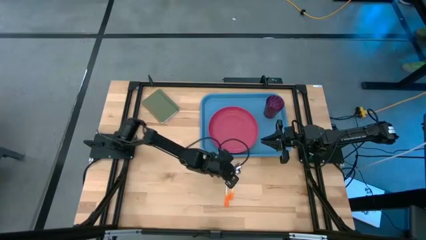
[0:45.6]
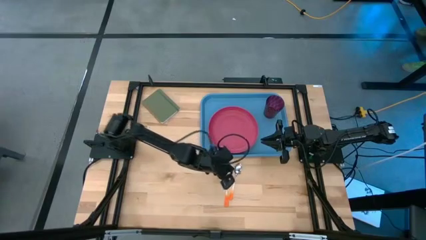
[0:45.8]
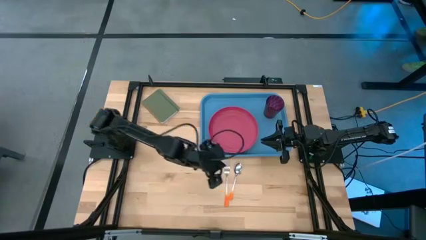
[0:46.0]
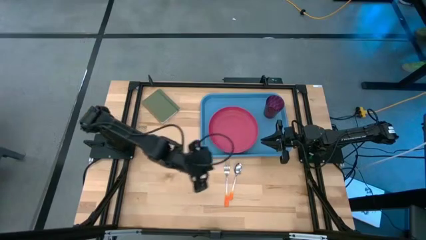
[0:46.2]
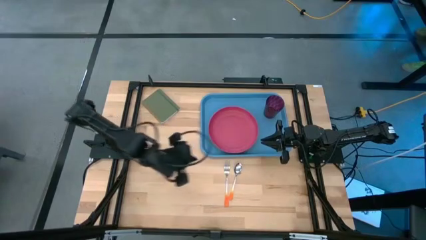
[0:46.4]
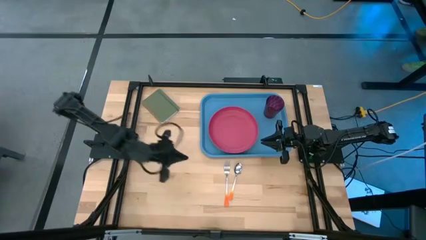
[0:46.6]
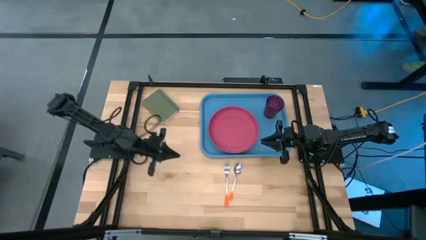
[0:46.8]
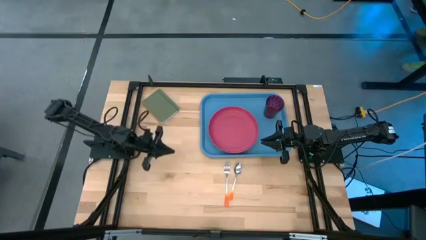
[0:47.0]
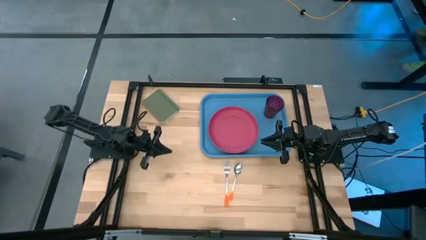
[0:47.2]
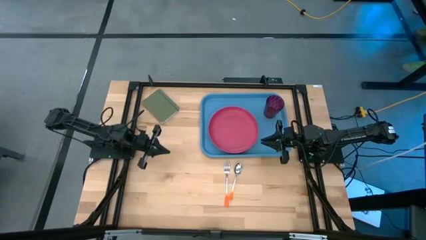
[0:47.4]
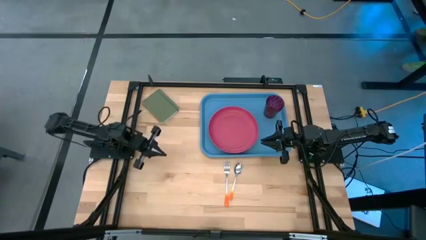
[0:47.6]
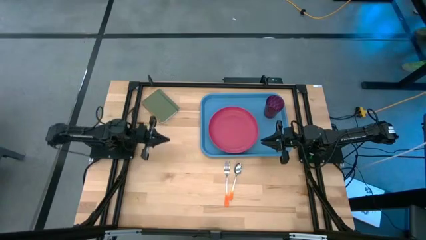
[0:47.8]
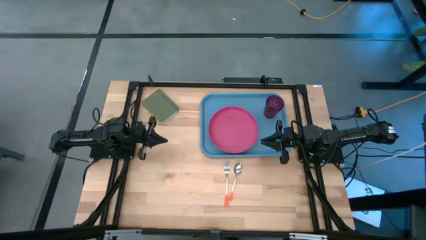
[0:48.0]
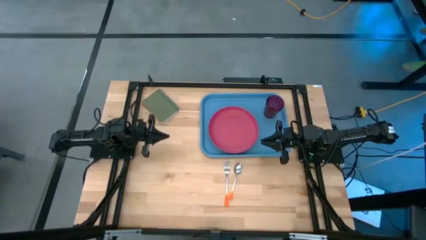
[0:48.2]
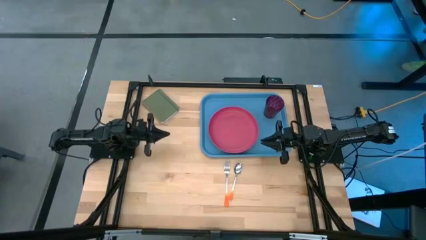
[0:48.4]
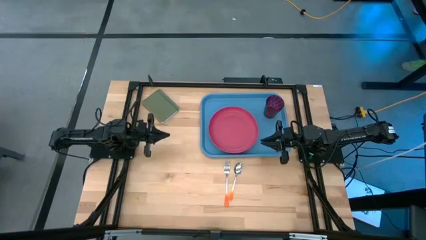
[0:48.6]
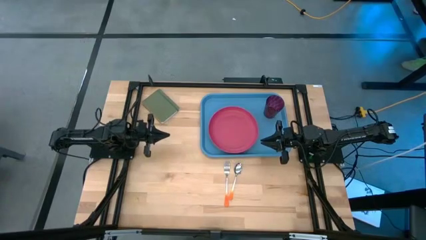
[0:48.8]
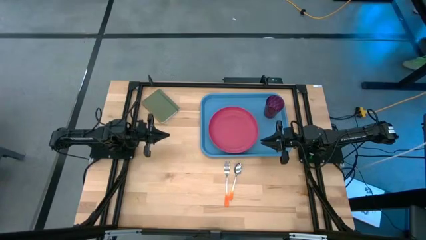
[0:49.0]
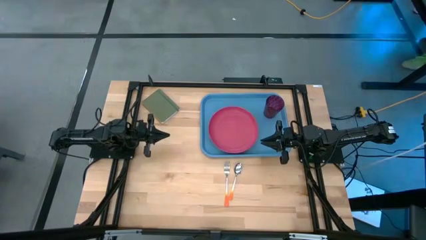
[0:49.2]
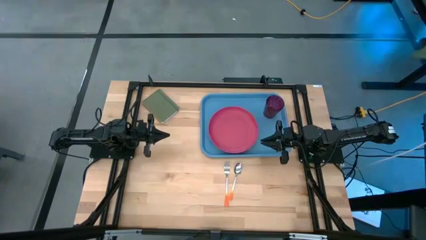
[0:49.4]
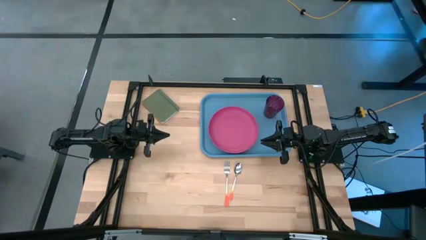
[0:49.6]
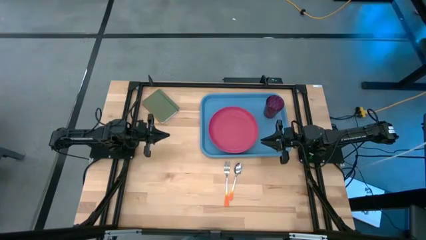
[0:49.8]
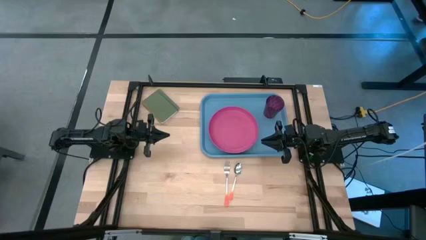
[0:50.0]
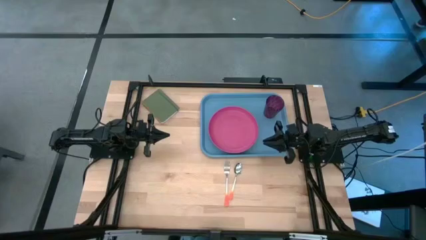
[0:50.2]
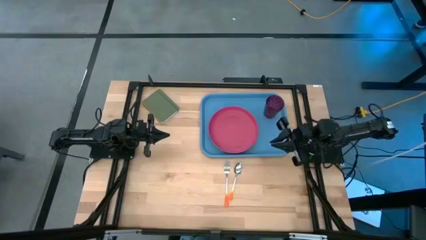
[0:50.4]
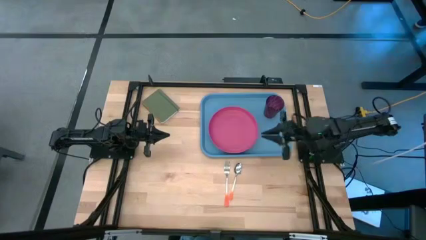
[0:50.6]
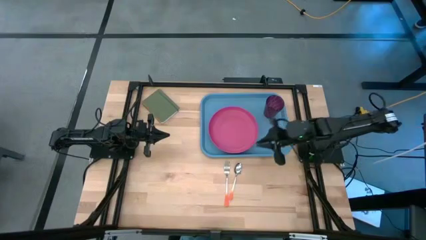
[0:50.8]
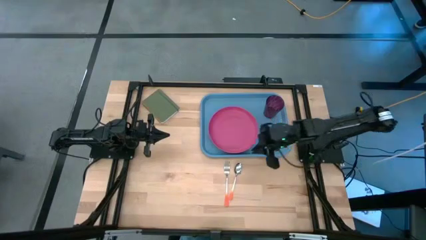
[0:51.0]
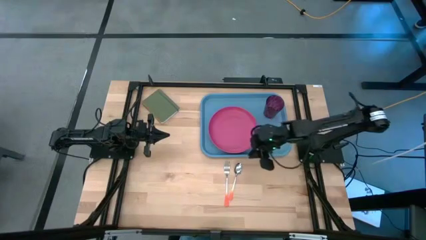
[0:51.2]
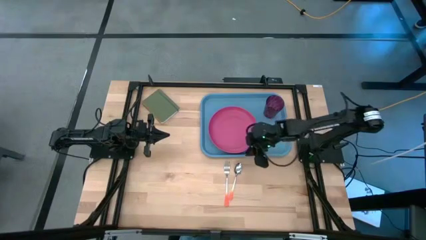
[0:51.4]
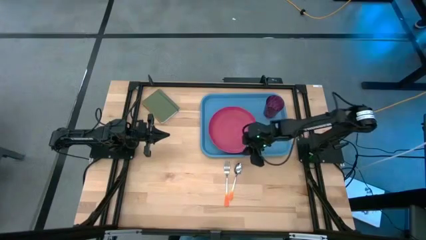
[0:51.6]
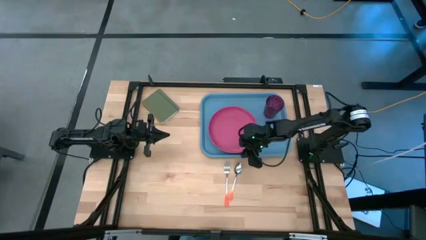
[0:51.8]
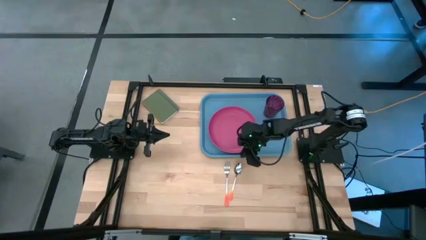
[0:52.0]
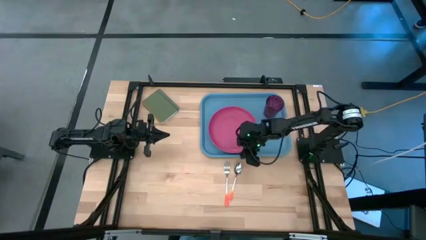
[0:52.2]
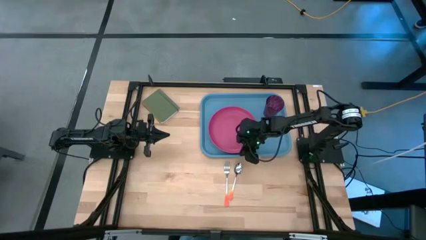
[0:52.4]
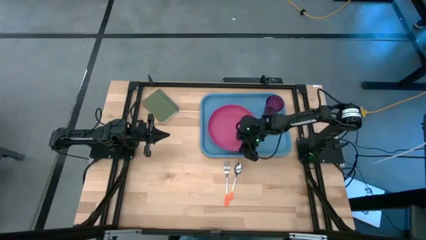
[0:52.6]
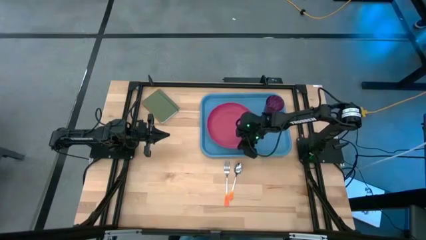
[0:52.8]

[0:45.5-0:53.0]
Task: Pick and place plate/cup/fork/spoon on tray
Adjust the pink plate on the blue tray

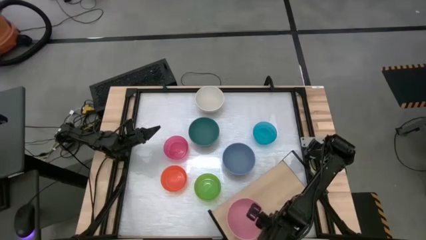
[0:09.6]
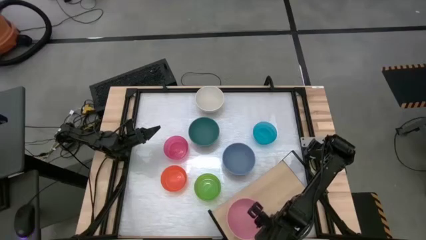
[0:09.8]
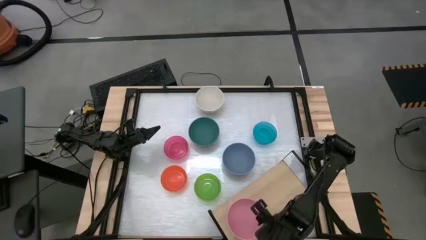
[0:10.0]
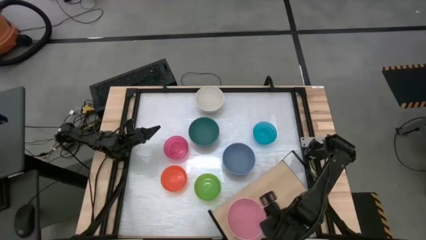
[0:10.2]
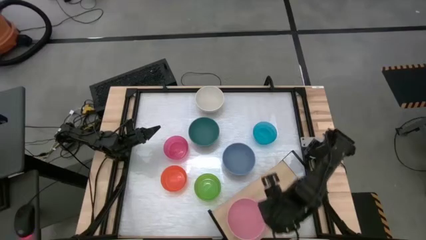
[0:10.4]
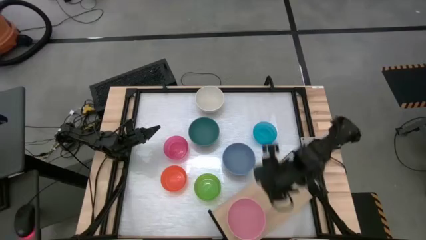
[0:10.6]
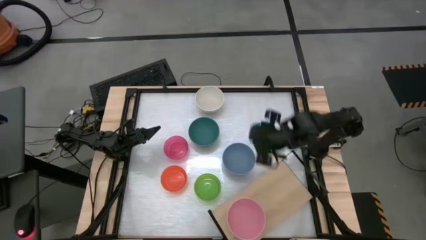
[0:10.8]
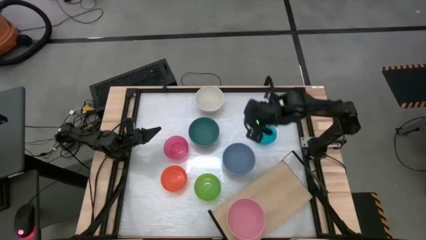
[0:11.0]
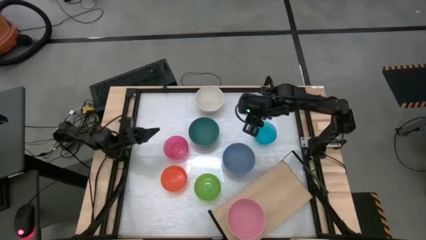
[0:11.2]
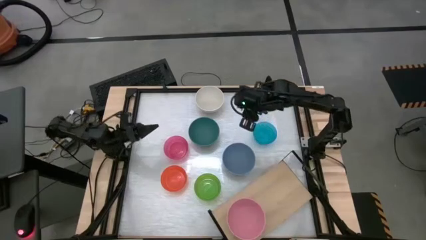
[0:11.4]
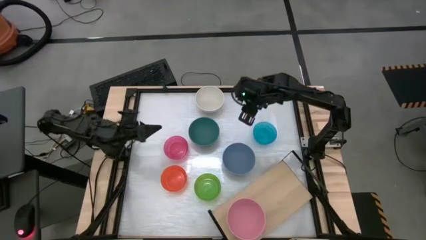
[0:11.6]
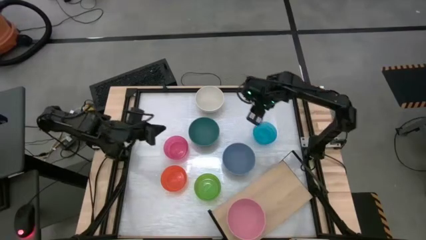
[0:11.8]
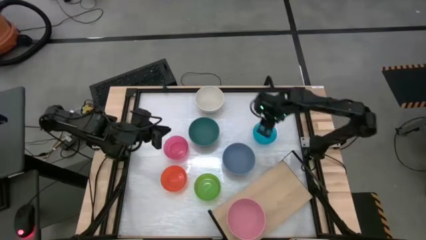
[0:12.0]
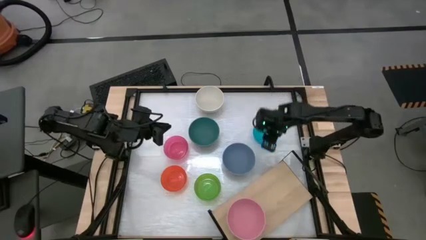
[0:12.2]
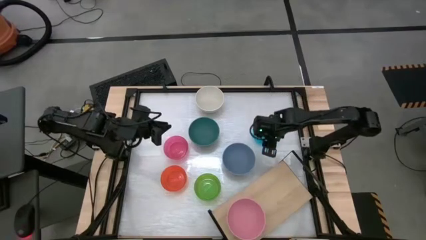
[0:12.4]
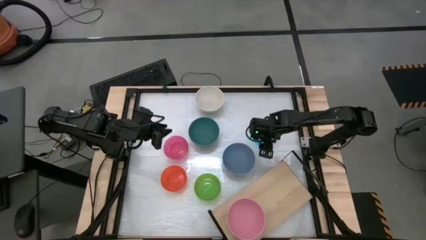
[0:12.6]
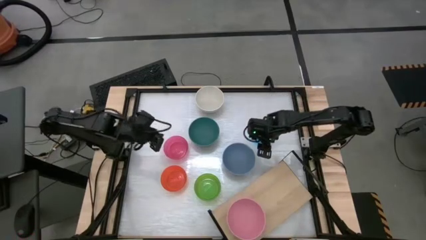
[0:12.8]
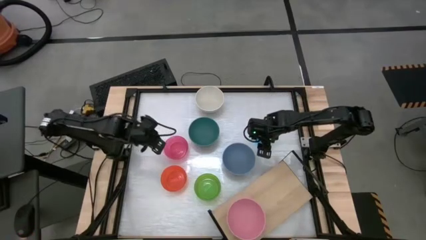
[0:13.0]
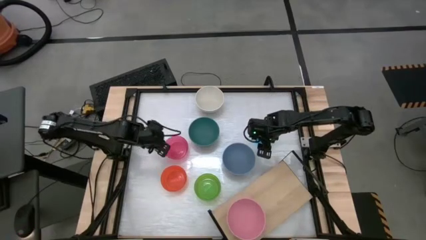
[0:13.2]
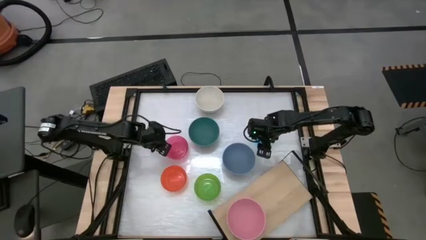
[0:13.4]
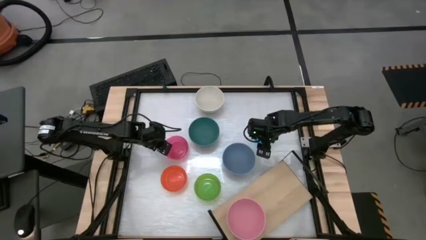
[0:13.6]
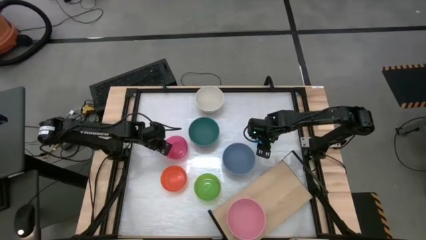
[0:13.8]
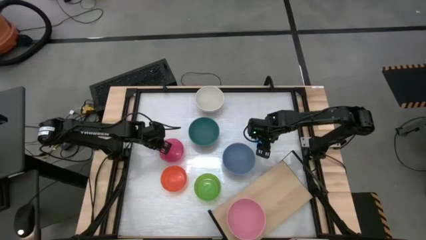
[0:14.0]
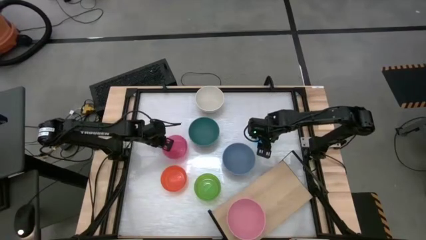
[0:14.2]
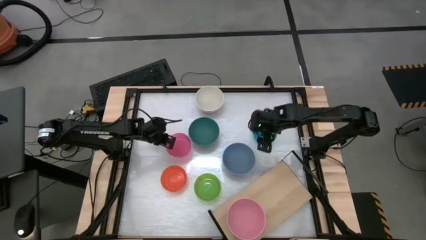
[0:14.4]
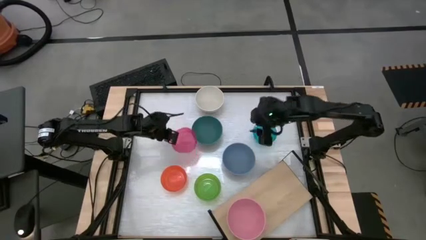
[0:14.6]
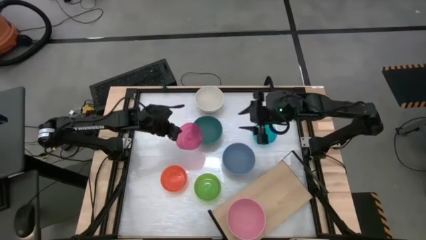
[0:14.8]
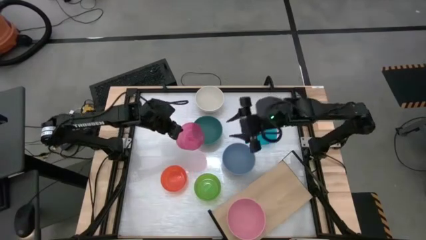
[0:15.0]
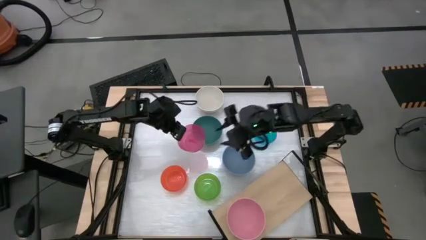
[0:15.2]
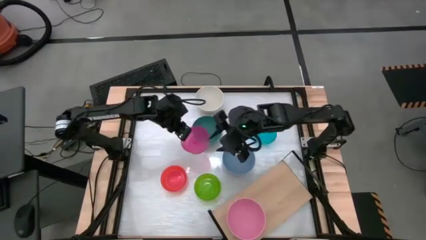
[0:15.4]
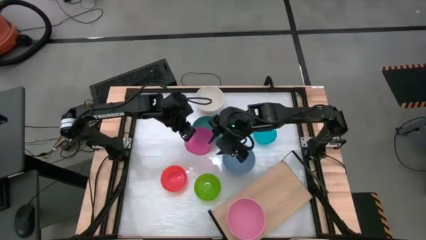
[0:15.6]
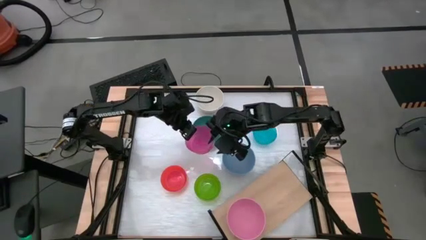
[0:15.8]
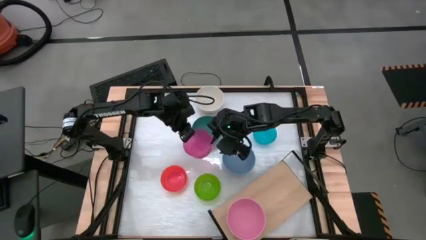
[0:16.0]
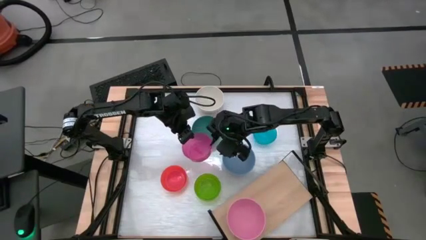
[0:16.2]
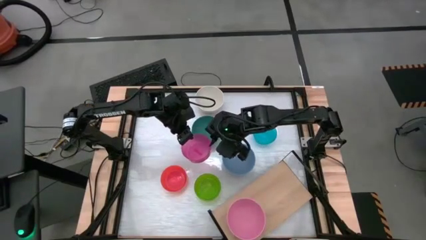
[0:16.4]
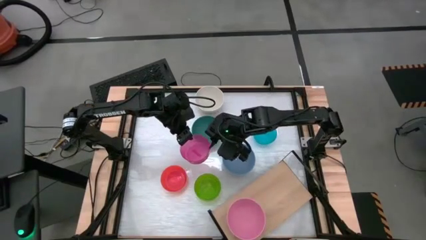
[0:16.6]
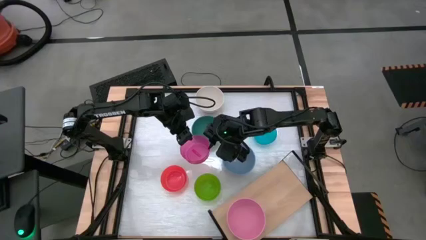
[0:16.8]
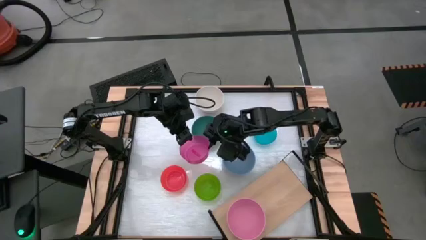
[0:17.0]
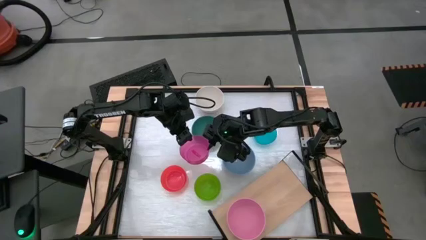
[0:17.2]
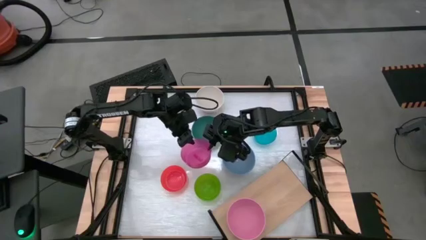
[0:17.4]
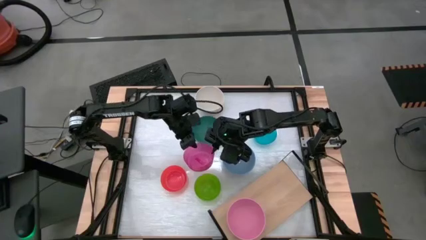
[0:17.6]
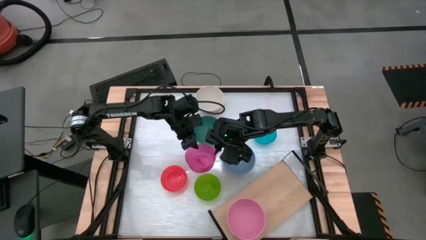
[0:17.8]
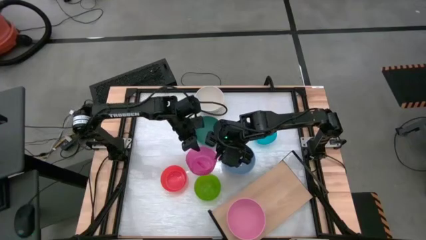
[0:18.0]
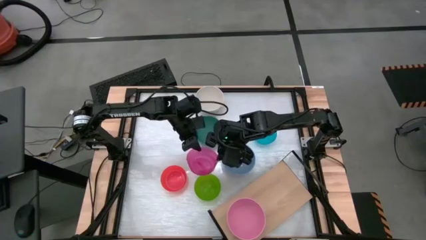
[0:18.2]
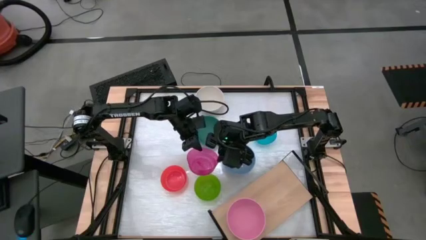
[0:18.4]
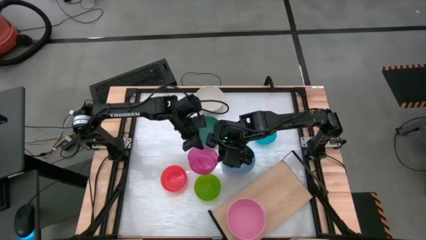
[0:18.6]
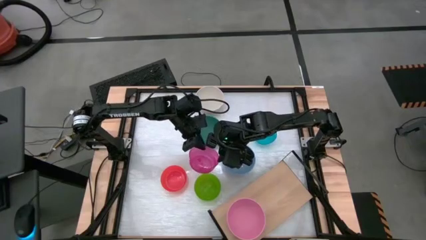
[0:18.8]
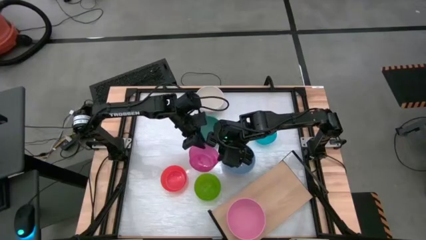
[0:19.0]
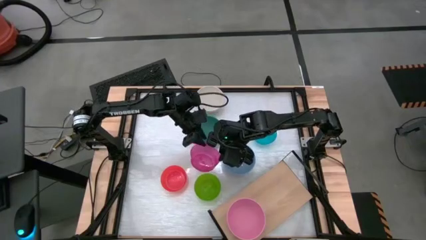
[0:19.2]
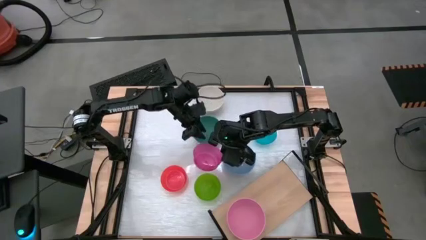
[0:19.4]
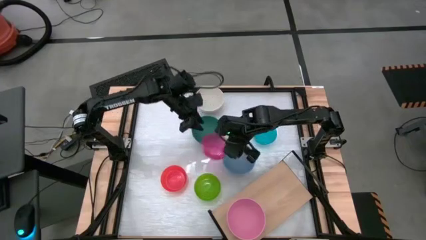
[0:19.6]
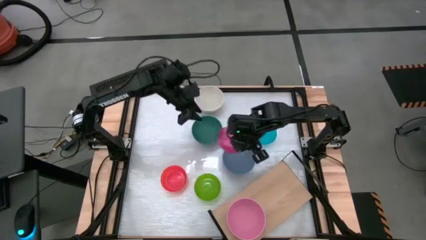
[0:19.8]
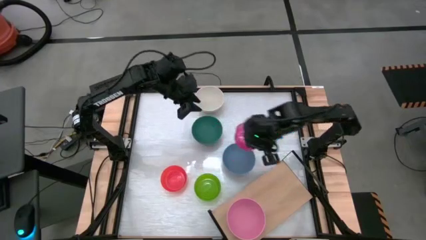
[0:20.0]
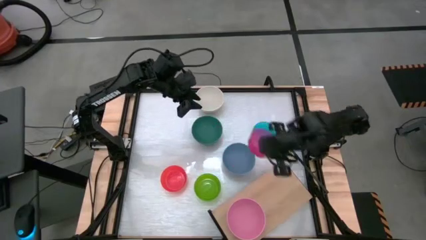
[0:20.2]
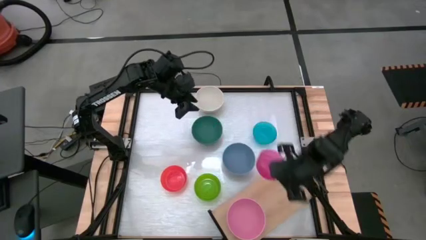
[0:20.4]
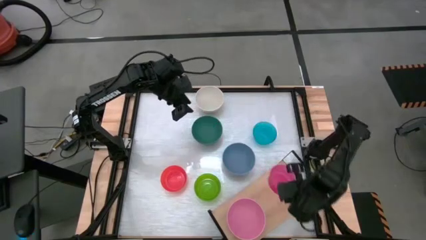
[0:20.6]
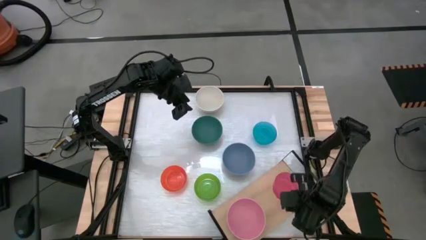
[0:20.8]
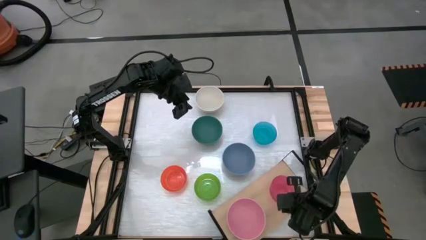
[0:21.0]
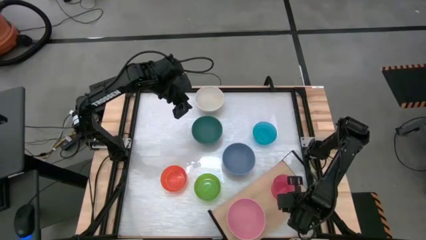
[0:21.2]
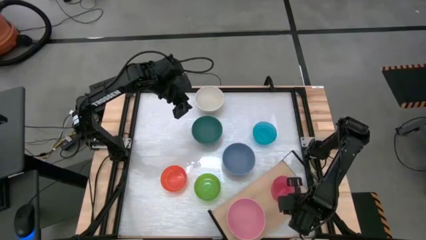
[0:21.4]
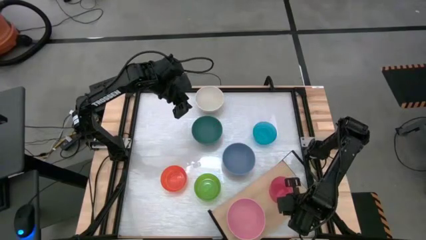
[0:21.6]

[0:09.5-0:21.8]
Task: Place and stack bowls onto a shelf
Put the pink bowl on the shelf
